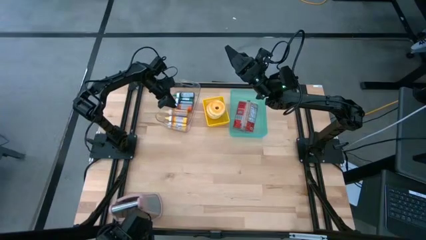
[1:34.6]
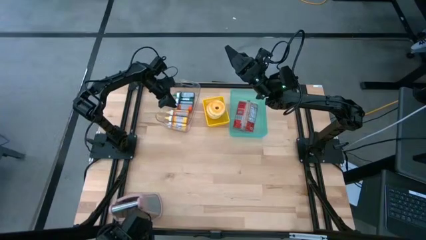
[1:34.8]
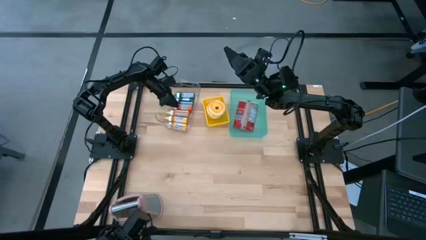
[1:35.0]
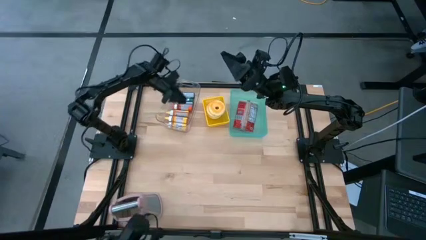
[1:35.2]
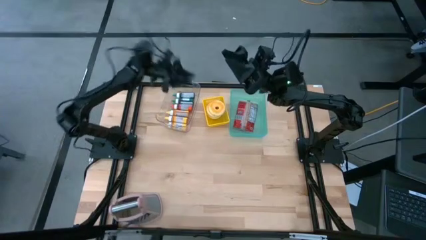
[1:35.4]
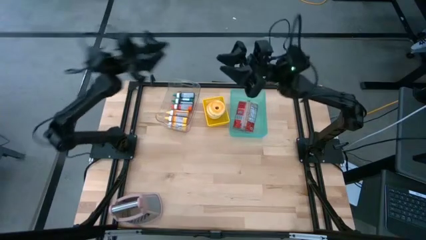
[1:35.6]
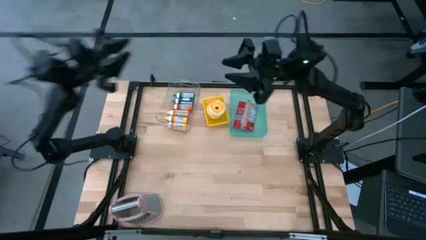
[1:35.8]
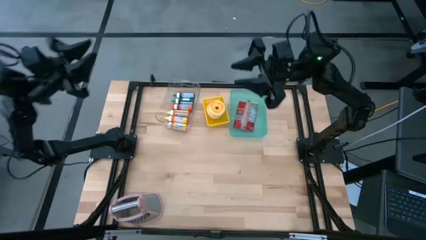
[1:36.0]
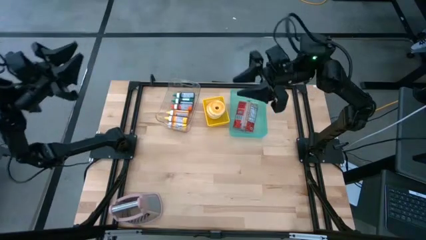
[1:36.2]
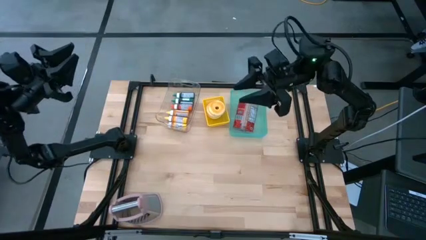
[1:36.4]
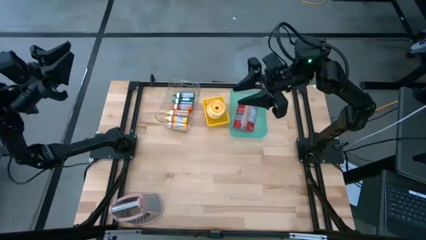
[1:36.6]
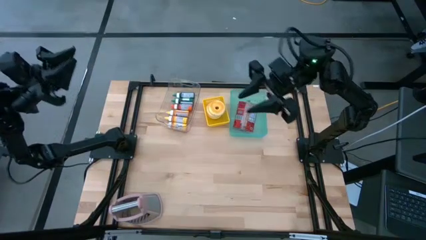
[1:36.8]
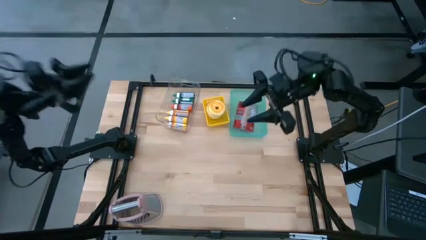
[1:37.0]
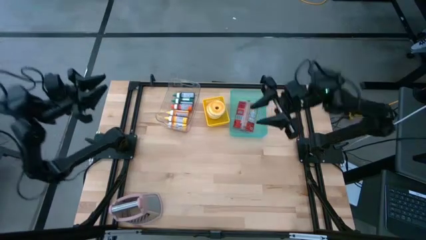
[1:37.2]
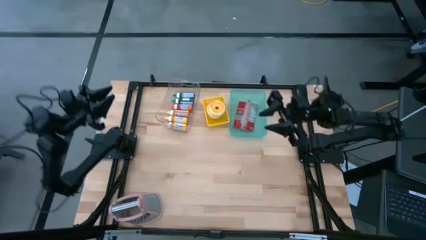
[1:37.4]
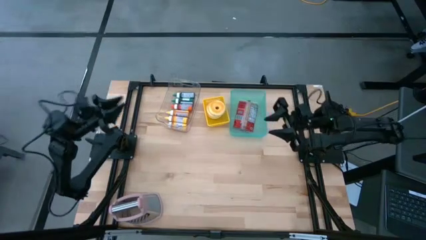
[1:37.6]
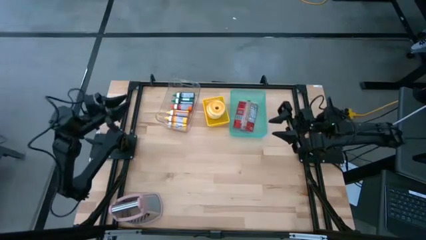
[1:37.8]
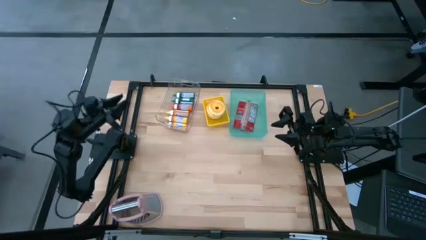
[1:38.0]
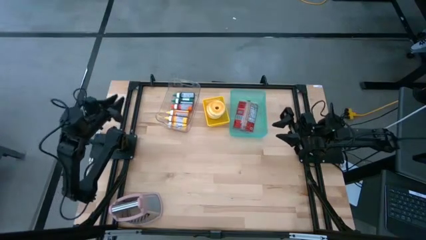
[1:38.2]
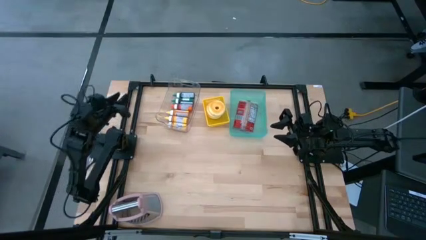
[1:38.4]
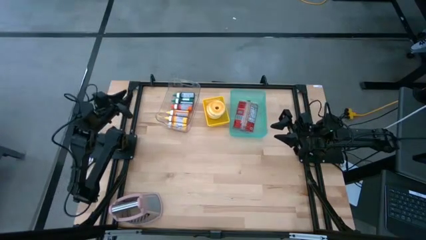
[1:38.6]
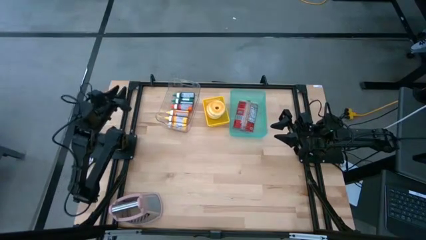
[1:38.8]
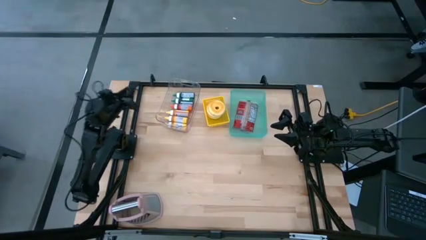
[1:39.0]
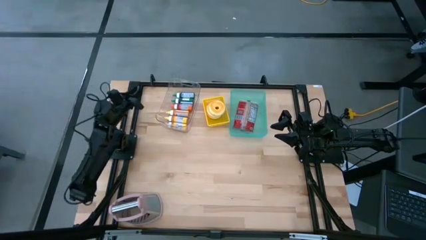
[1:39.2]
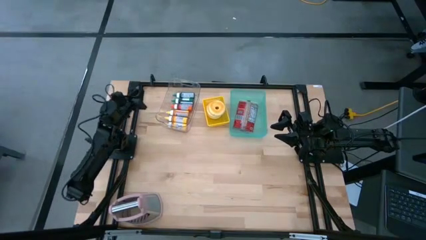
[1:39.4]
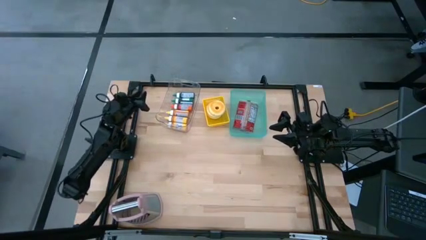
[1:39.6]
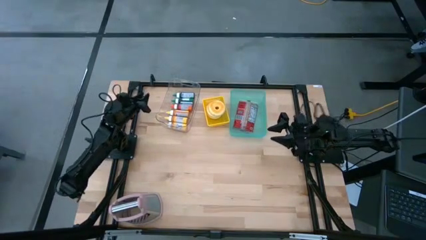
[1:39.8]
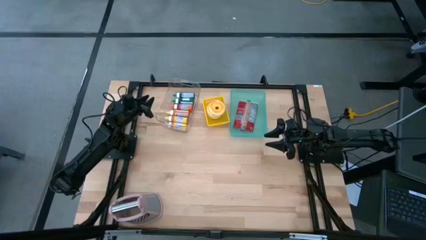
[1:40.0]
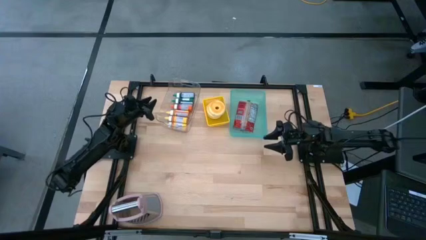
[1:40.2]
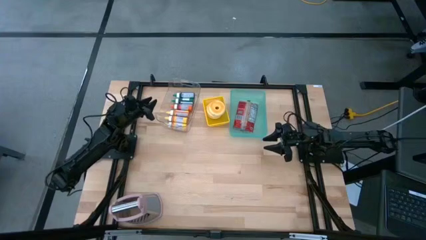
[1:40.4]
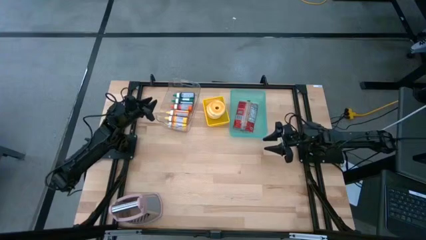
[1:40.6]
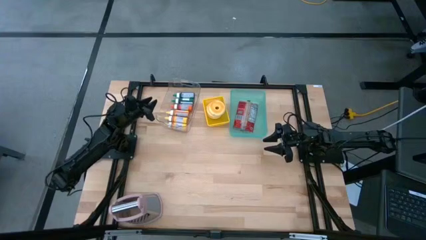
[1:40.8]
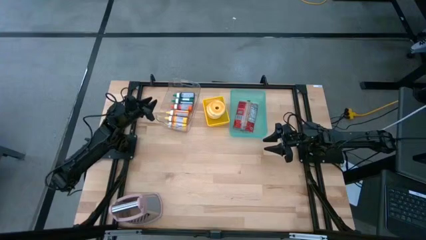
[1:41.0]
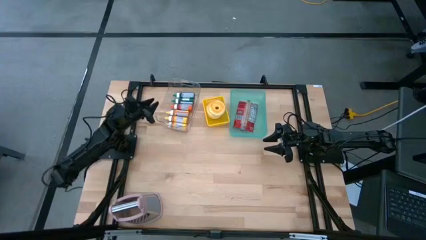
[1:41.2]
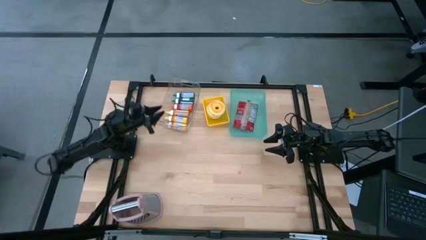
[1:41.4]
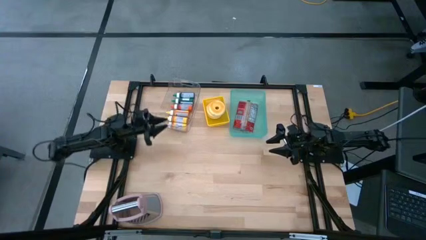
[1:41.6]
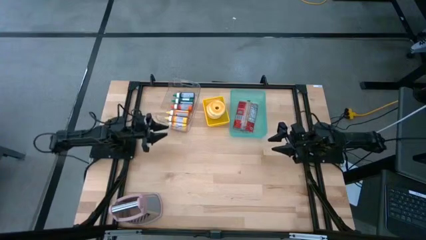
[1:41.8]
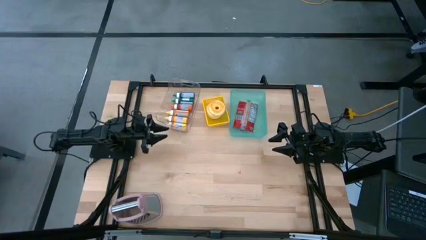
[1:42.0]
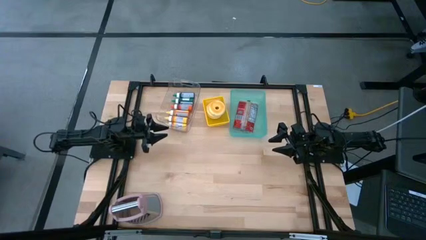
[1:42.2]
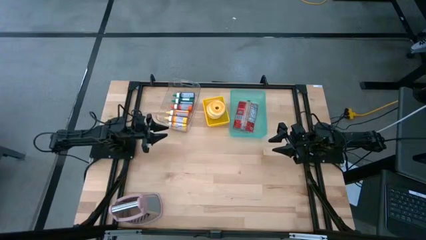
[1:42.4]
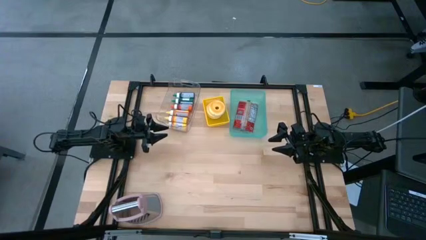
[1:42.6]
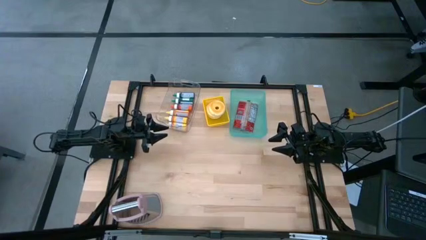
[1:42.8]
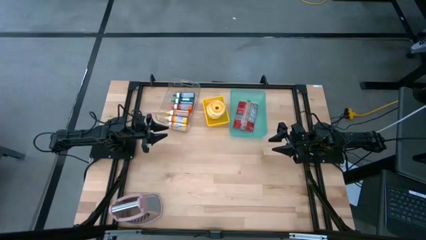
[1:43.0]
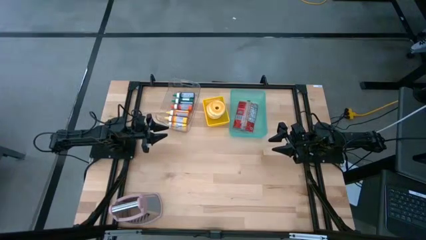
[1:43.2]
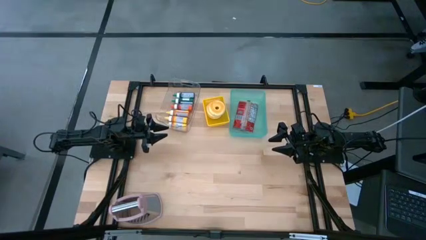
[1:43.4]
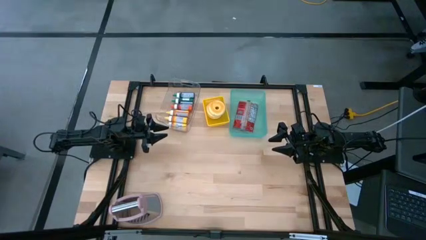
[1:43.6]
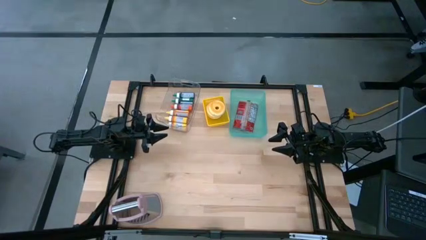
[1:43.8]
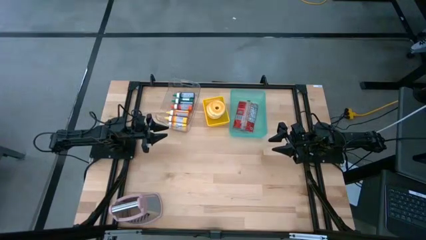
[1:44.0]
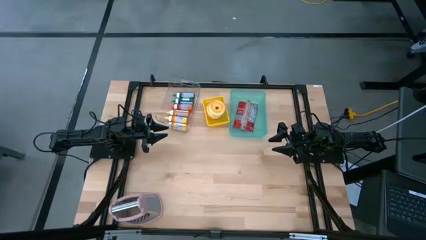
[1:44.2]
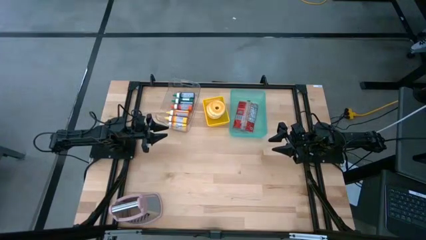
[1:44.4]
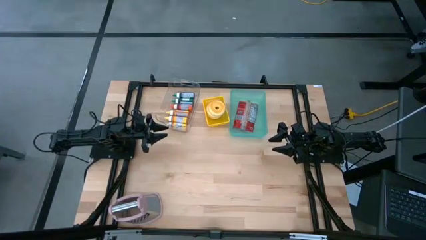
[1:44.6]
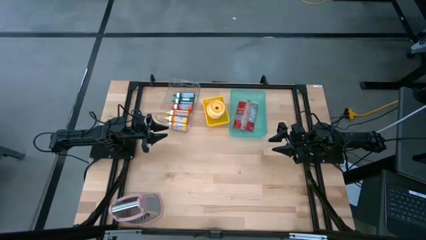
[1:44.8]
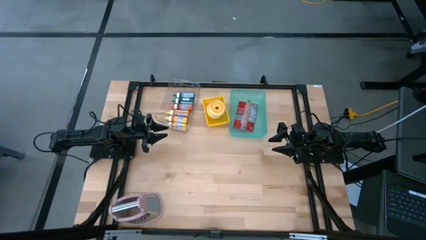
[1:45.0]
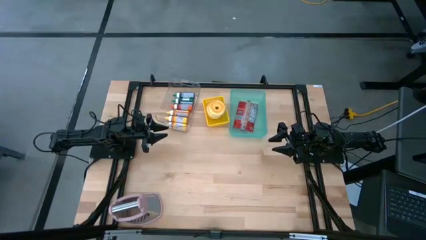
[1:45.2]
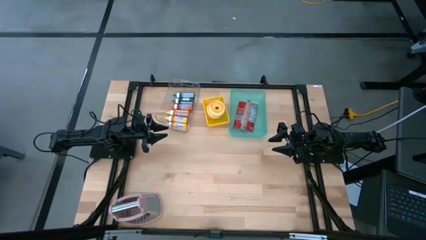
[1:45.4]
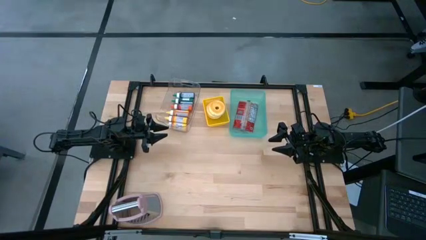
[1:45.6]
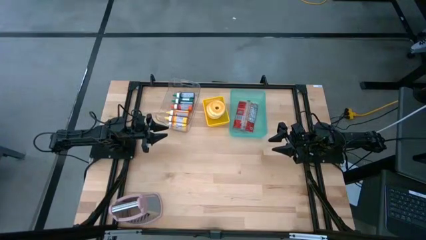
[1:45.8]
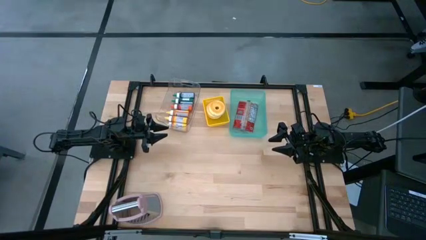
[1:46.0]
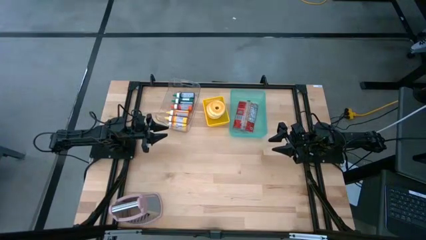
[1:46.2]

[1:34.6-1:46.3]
Return to Home Position
